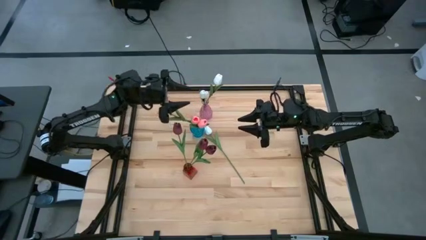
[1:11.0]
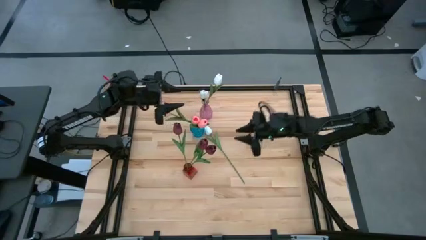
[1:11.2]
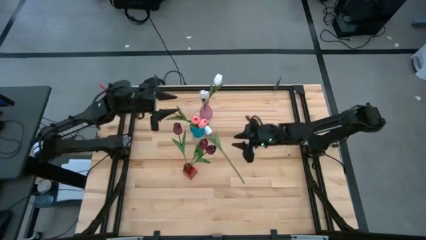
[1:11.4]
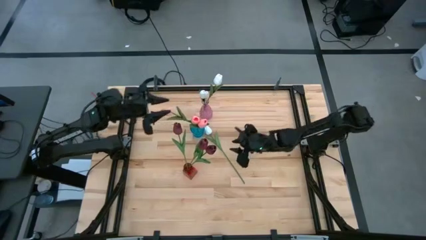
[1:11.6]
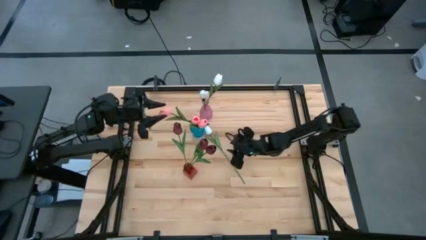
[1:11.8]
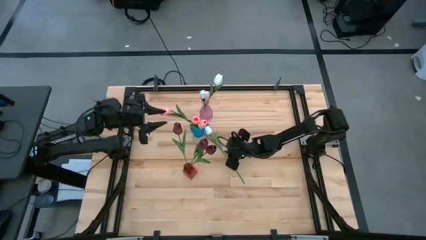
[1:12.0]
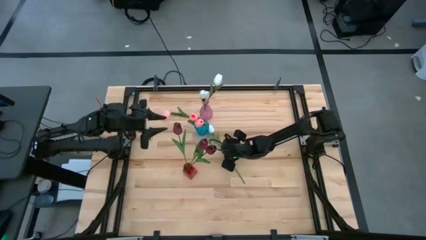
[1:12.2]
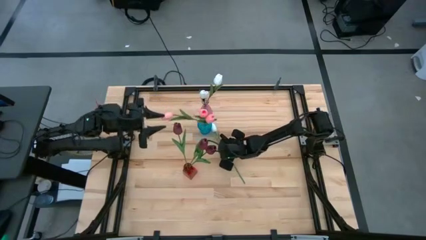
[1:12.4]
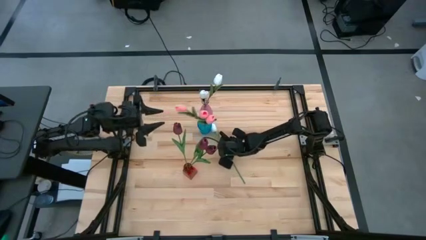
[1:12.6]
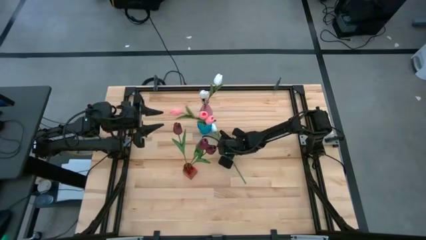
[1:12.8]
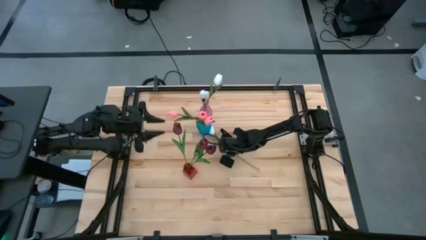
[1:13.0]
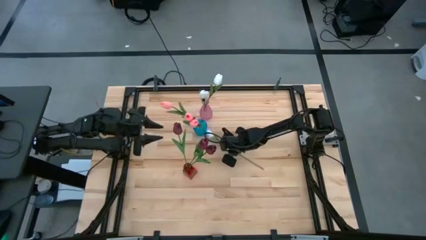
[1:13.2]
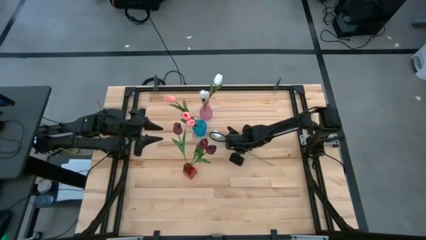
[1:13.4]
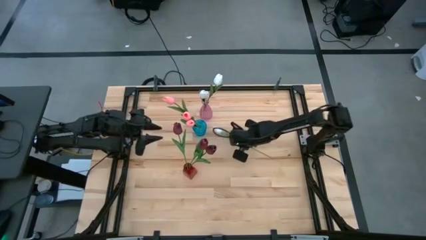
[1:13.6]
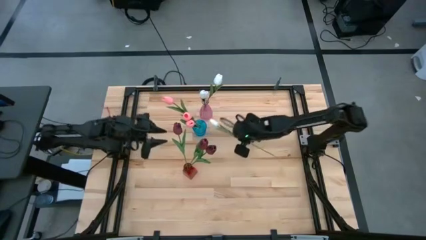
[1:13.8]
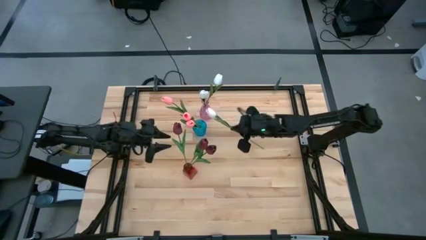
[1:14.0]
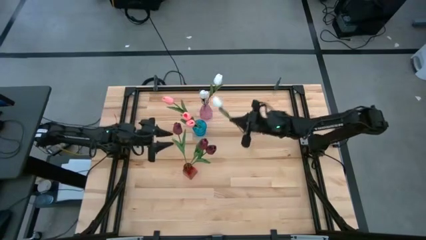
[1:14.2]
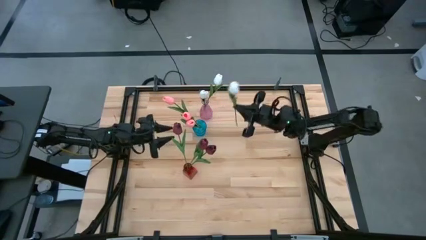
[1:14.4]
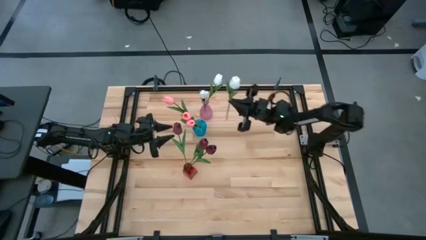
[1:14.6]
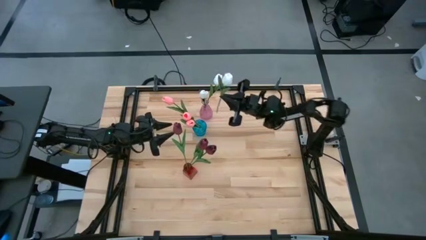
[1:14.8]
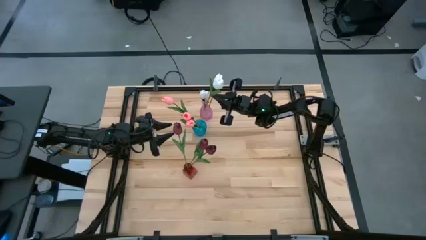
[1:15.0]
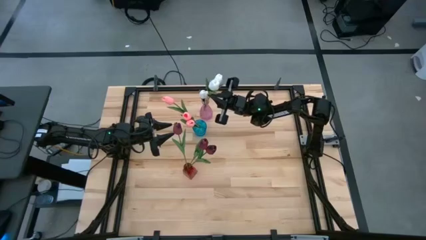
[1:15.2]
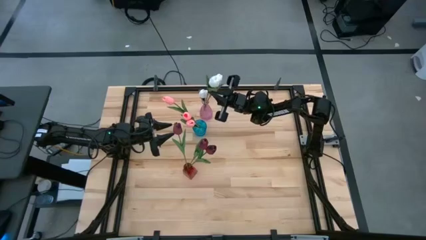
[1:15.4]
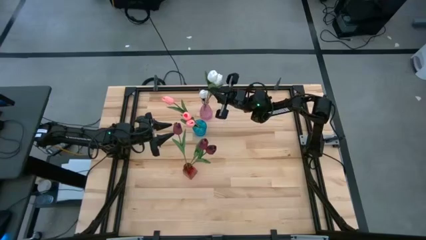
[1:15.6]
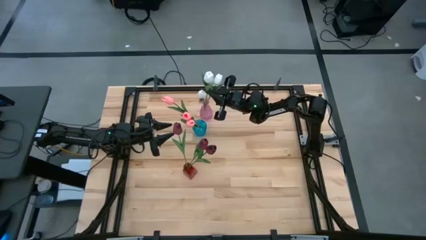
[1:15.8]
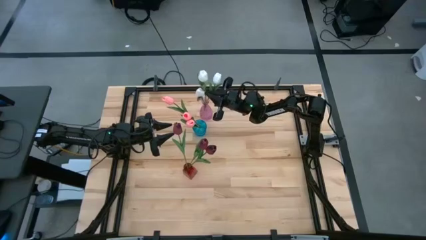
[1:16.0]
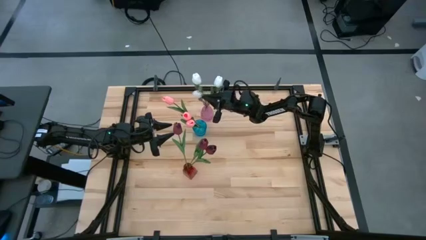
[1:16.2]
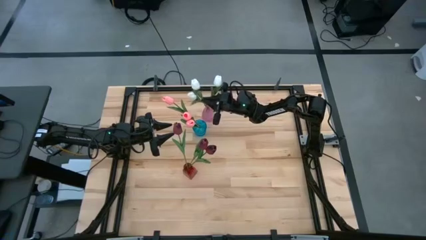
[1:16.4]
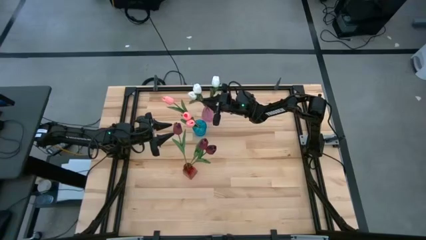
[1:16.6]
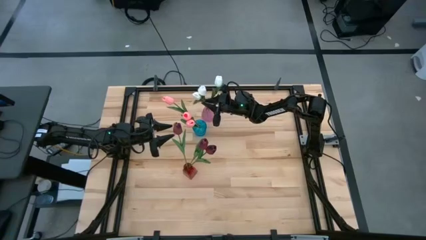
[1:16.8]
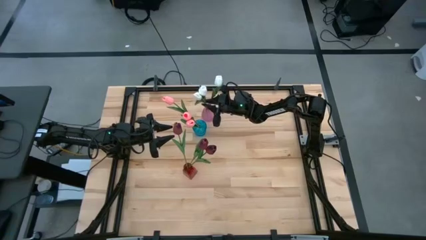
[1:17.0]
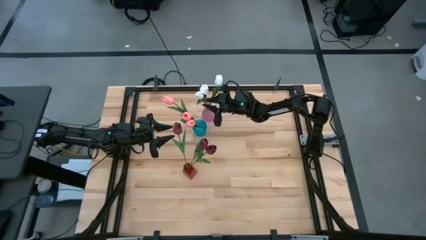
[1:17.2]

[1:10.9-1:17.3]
Task: Sort flowers into vase by color
Put the white flower into the violet vase

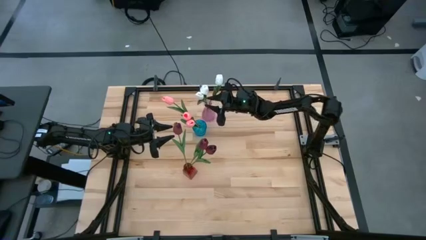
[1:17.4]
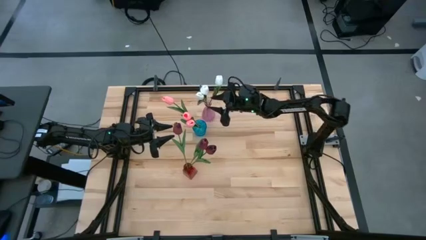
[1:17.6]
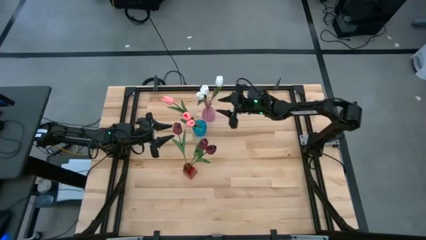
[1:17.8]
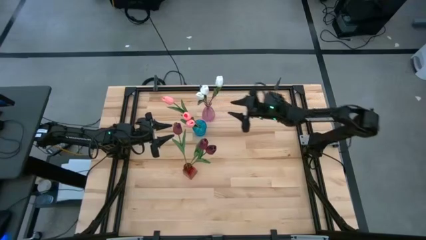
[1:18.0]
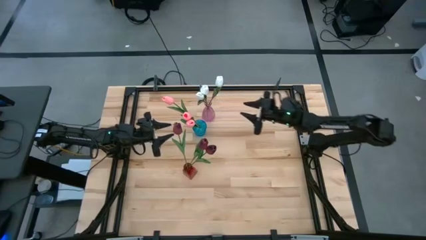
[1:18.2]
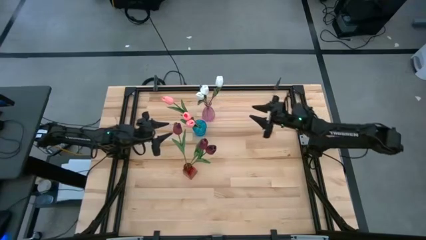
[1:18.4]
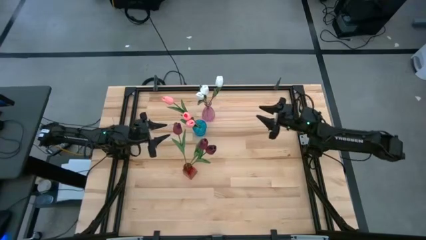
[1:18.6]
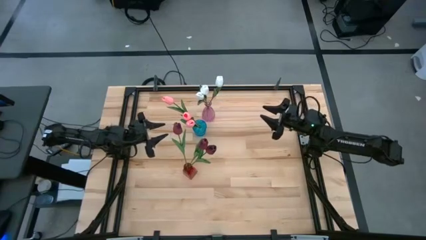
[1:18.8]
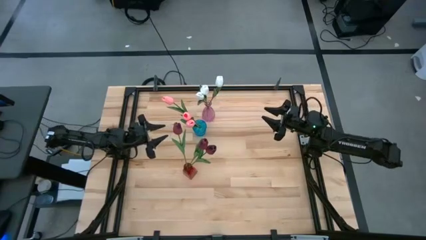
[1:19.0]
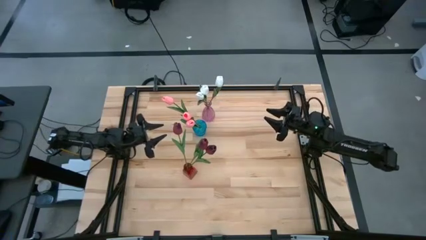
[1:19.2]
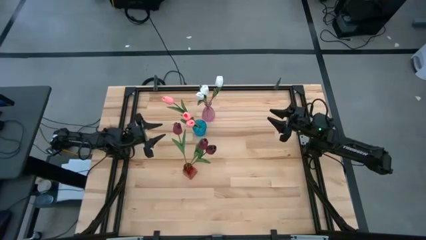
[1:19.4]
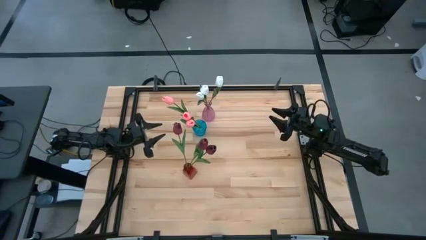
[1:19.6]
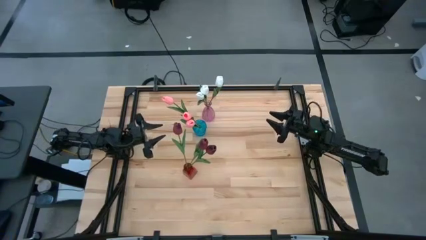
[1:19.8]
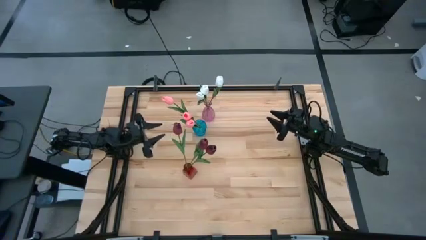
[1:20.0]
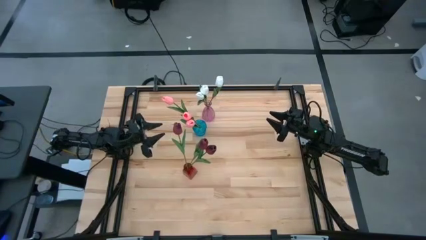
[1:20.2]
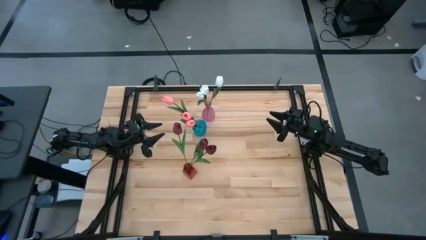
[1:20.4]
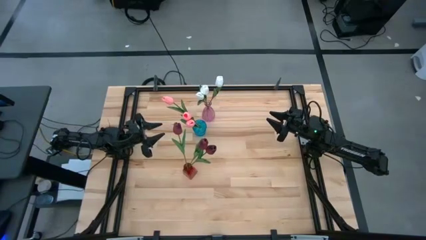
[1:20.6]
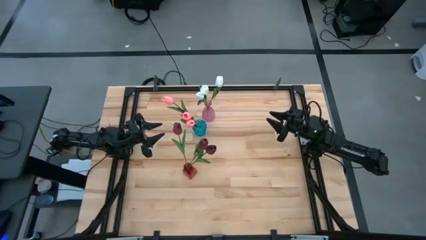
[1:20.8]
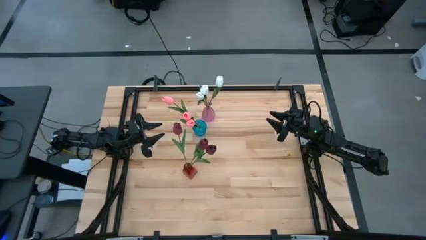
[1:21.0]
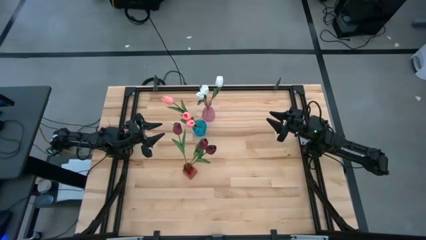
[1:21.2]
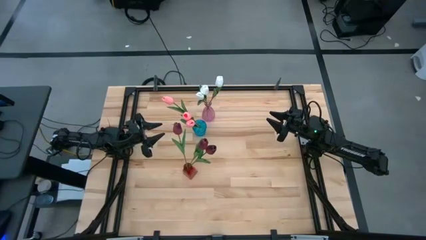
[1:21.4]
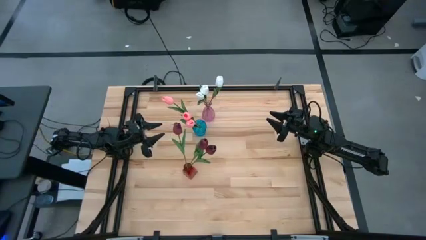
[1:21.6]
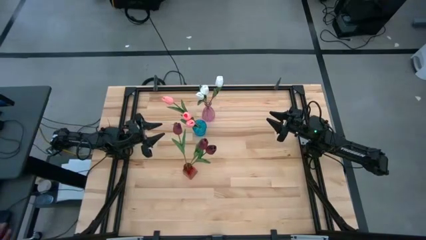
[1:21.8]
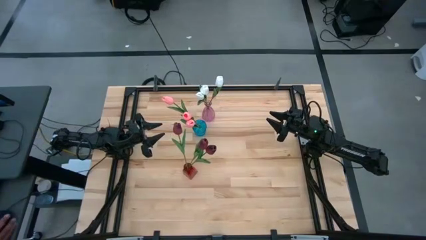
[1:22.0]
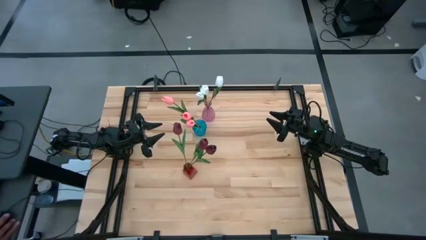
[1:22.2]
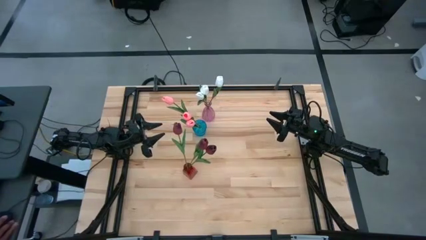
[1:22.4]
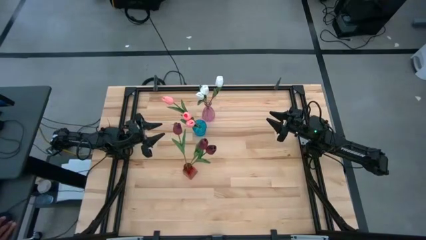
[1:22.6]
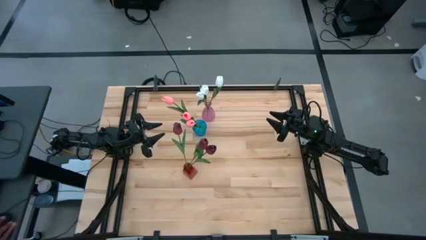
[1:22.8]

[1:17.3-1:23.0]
Return to Home Position

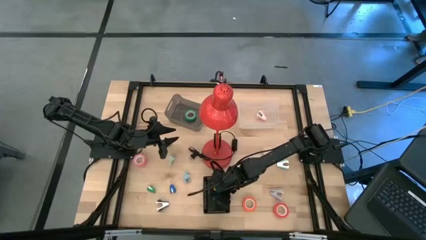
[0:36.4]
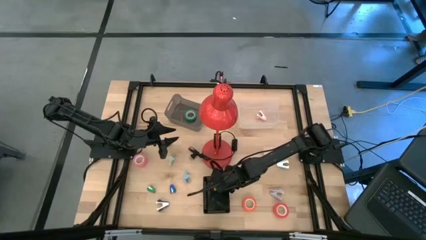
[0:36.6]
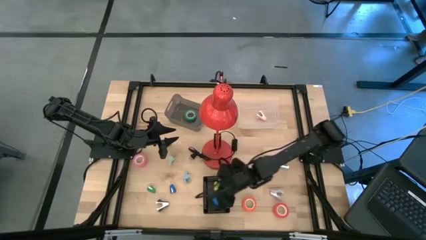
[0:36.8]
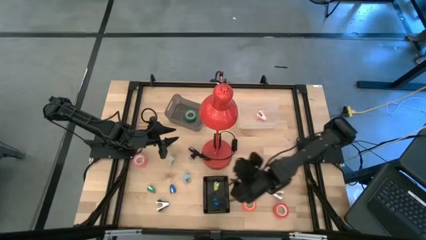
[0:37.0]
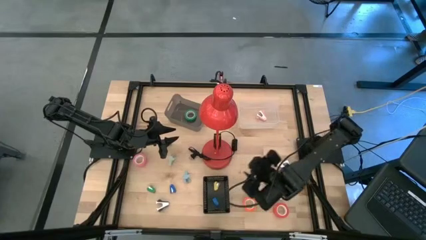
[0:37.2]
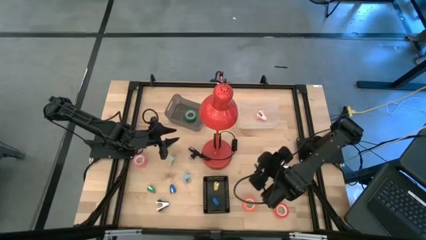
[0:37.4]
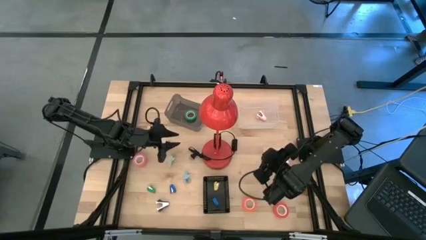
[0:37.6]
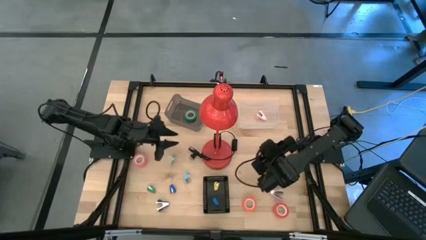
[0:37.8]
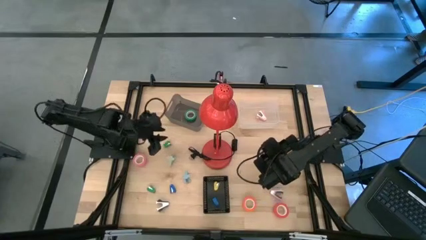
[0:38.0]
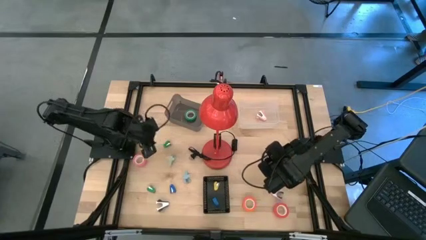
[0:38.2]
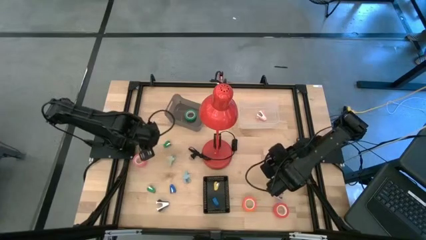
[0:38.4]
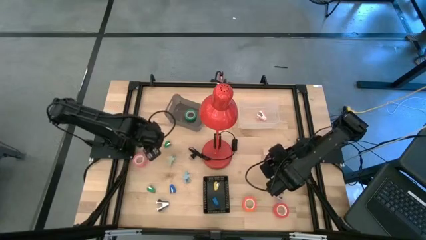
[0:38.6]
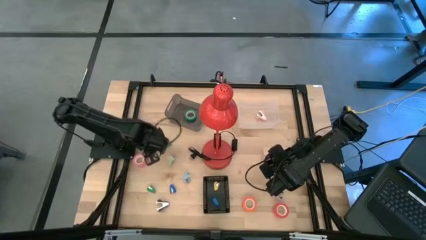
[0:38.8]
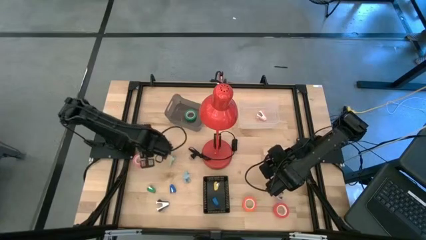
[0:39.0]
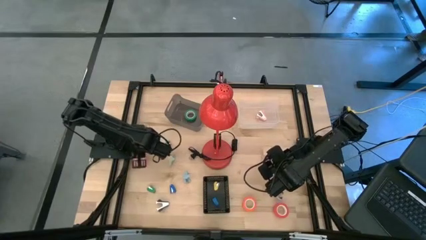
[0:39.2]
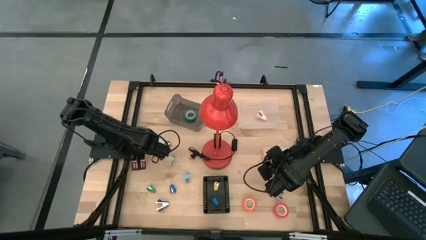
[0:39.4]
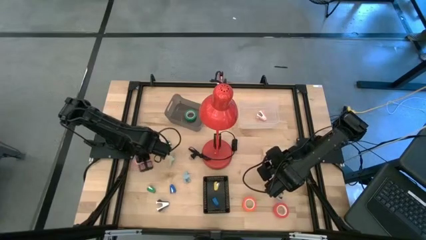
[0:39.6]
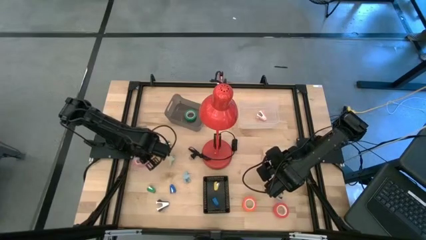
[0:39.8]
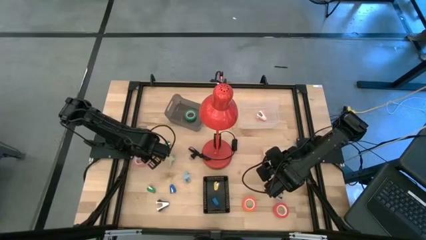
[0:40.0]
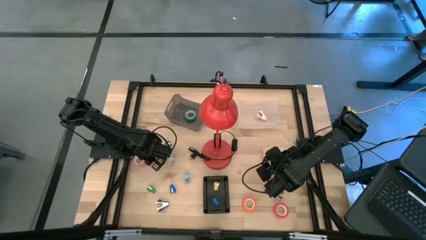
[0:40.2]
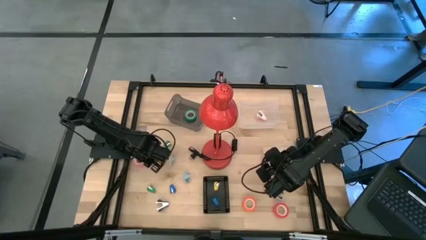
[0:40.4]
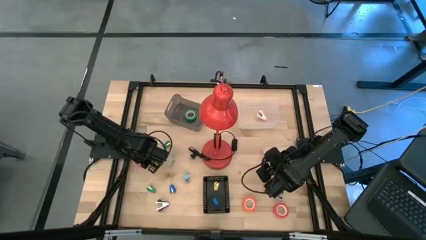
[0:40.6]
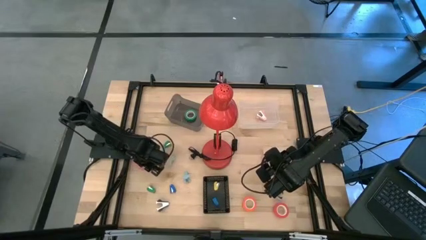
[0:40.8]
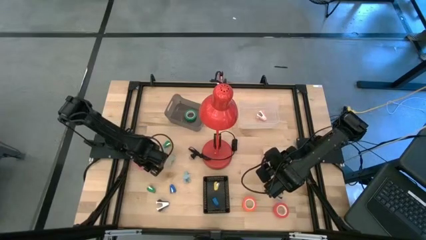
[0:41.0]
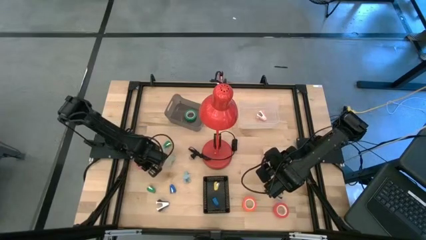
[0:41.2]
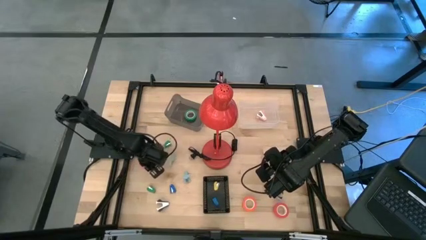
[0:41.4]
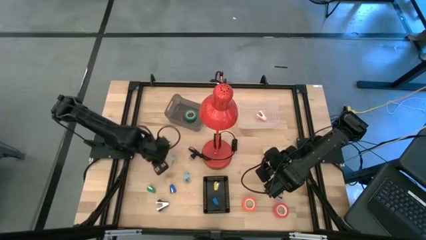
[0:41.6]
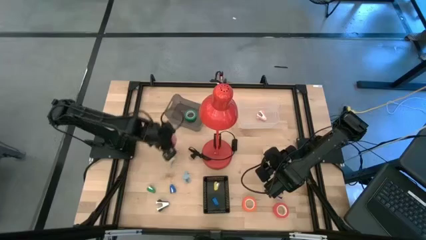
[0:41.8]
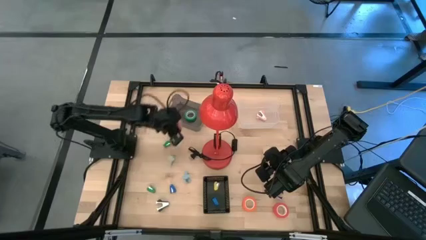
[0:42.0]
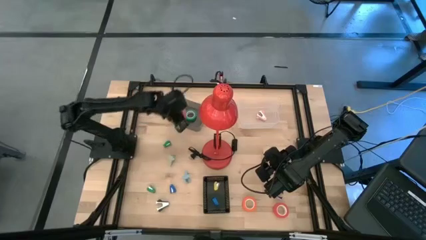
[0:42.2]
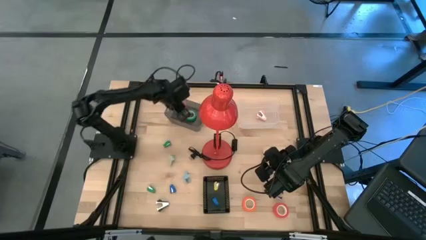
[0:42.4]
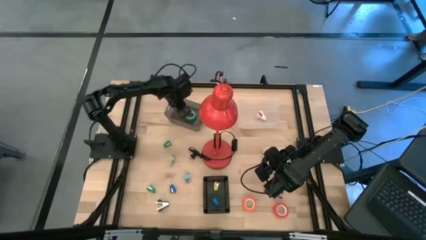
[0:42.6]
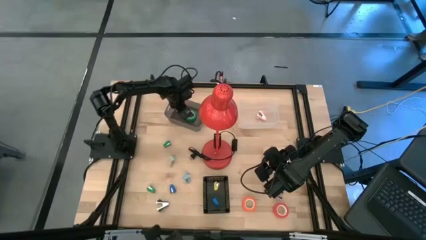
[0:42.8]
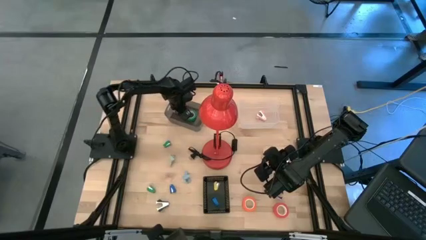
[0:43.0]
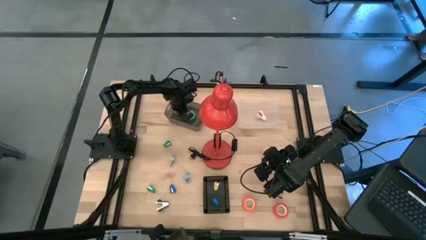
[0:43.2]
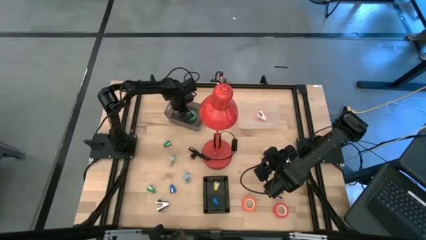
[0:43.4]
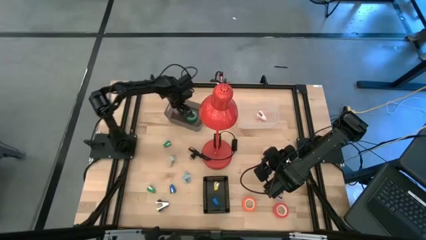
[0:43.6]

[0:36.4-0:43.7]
Task: Pick and place Stapler, Stapler remover, tape
Put the pink tape into the black transparent bin
